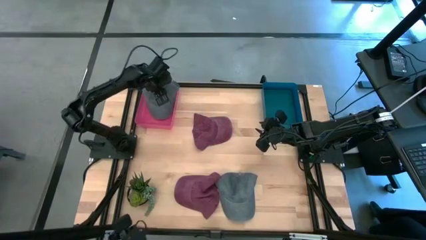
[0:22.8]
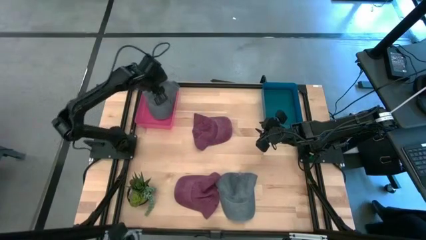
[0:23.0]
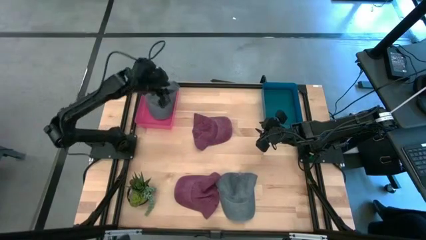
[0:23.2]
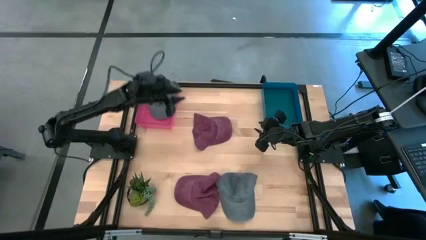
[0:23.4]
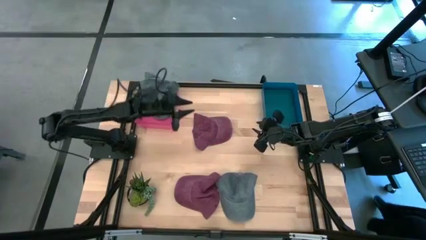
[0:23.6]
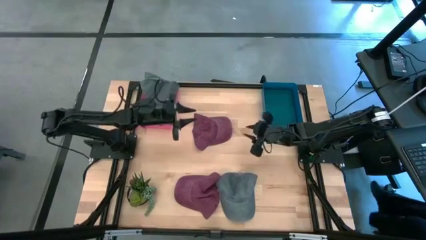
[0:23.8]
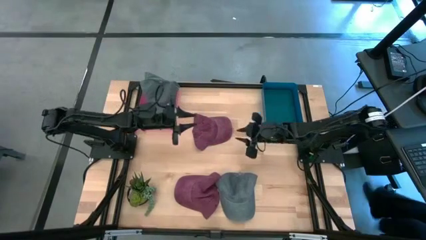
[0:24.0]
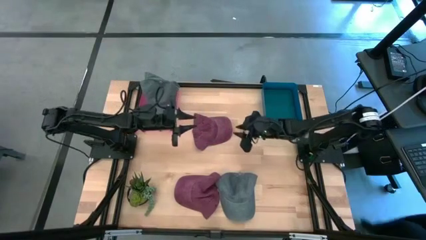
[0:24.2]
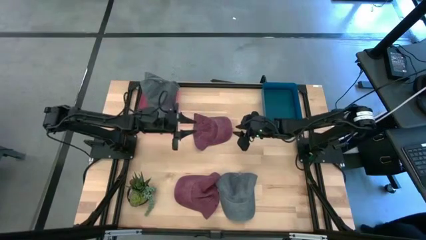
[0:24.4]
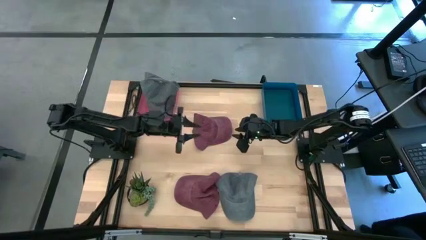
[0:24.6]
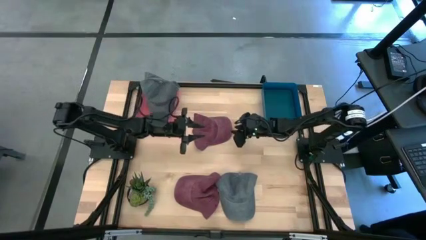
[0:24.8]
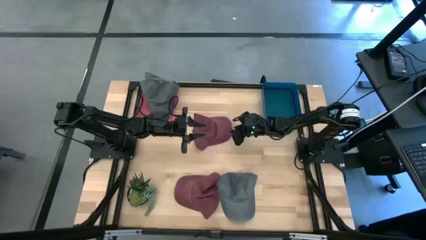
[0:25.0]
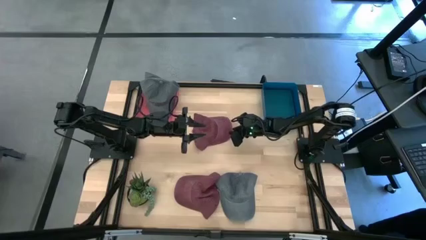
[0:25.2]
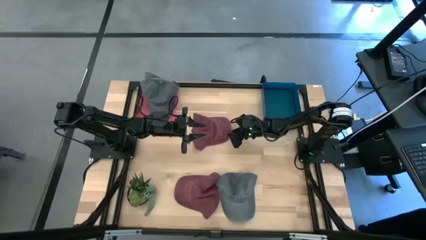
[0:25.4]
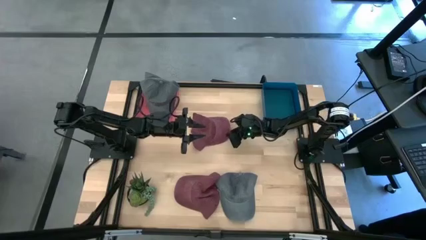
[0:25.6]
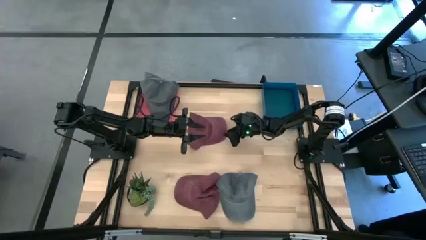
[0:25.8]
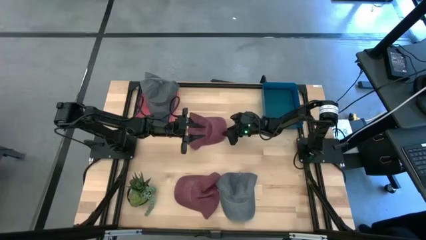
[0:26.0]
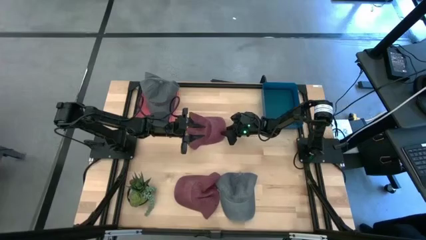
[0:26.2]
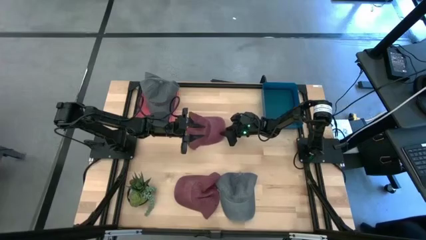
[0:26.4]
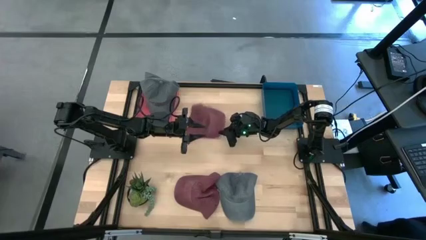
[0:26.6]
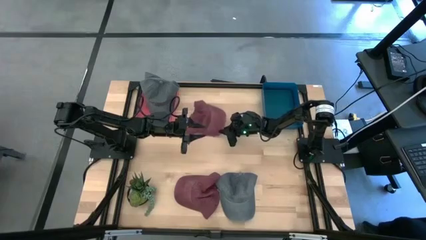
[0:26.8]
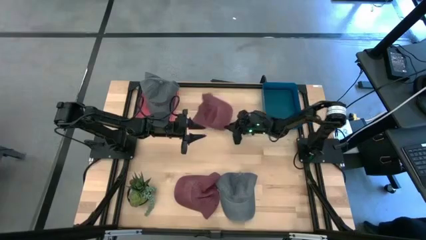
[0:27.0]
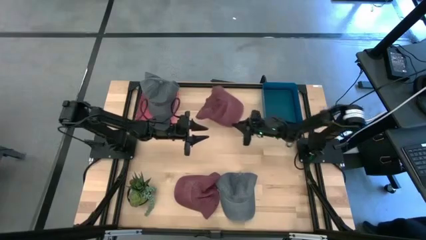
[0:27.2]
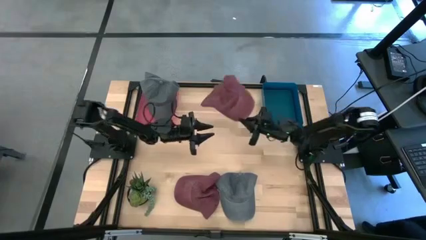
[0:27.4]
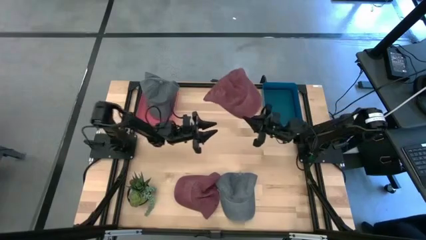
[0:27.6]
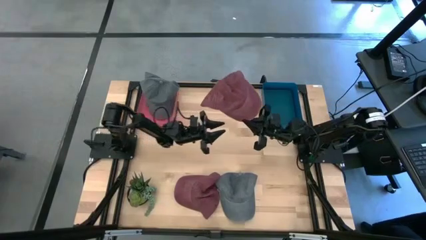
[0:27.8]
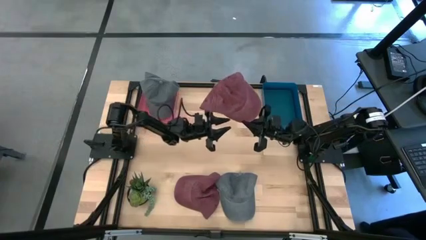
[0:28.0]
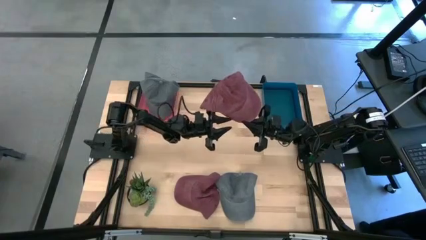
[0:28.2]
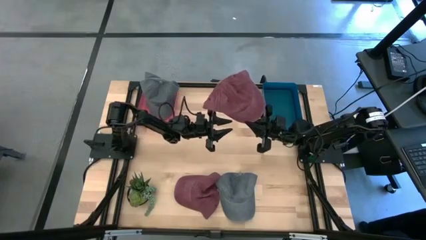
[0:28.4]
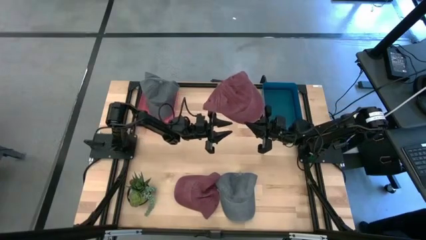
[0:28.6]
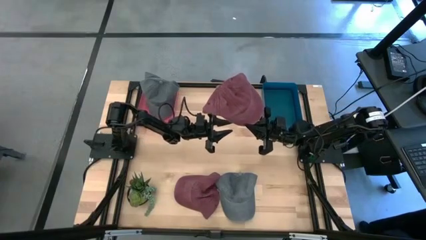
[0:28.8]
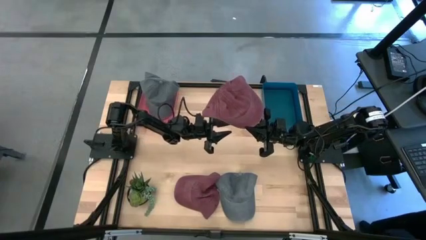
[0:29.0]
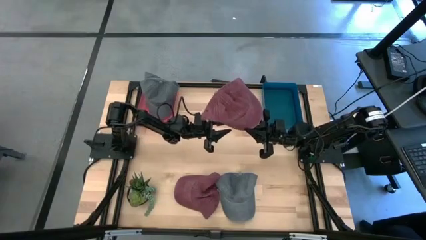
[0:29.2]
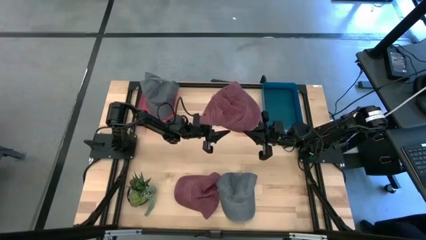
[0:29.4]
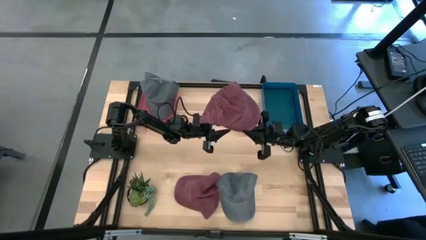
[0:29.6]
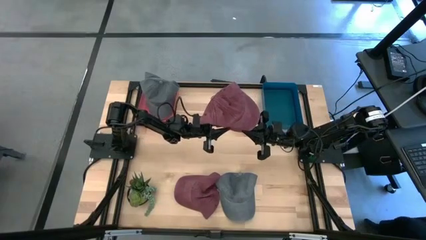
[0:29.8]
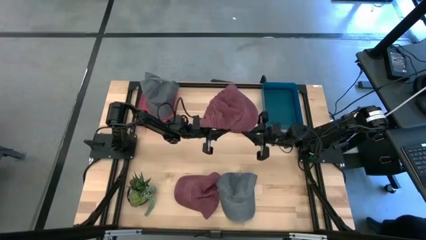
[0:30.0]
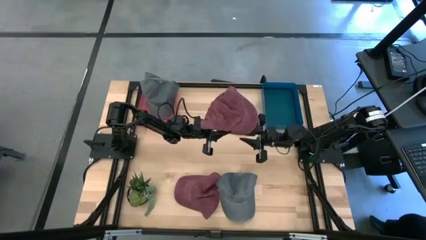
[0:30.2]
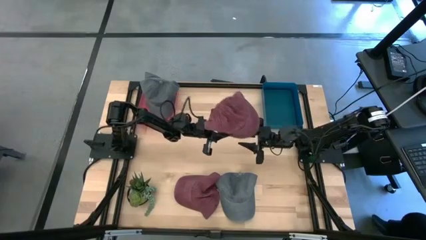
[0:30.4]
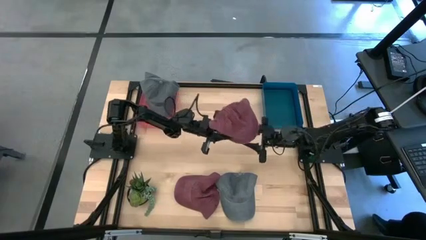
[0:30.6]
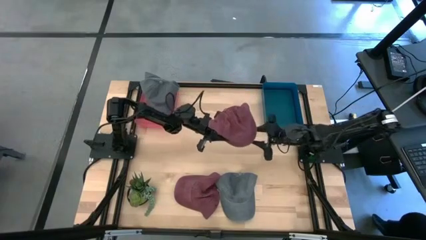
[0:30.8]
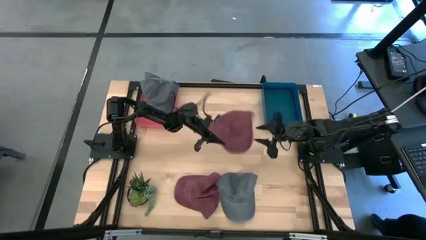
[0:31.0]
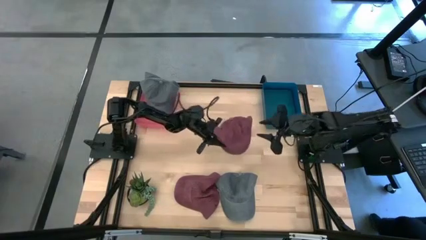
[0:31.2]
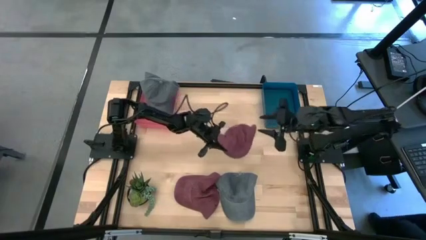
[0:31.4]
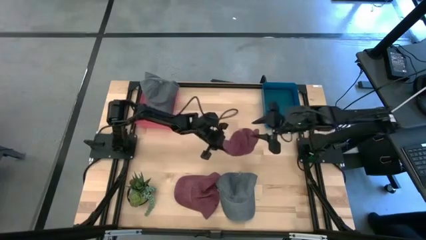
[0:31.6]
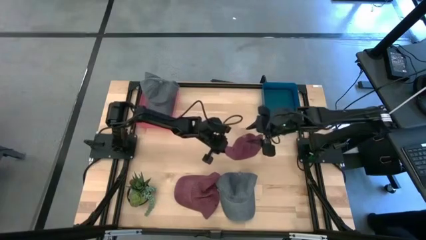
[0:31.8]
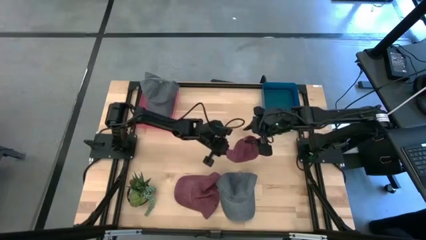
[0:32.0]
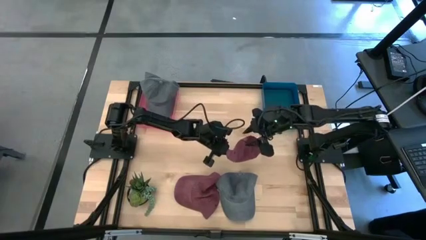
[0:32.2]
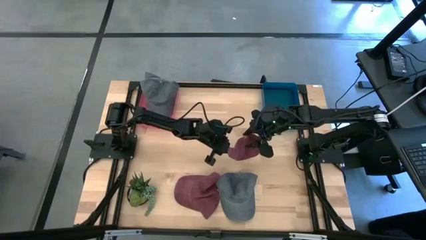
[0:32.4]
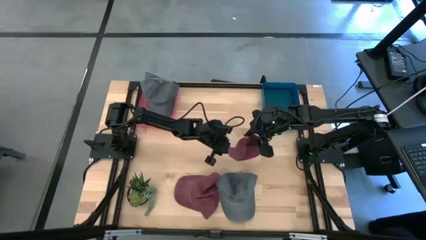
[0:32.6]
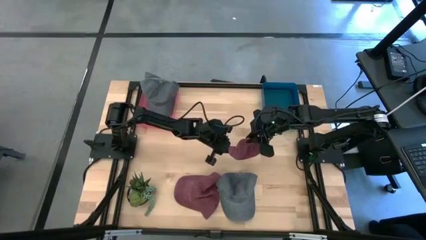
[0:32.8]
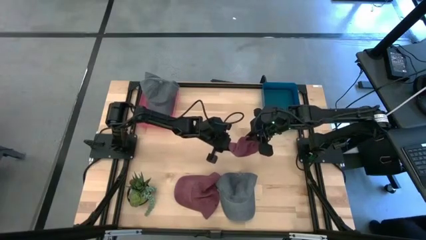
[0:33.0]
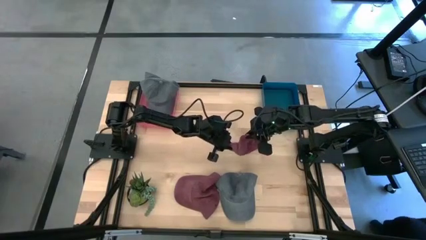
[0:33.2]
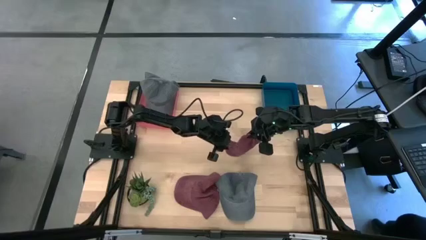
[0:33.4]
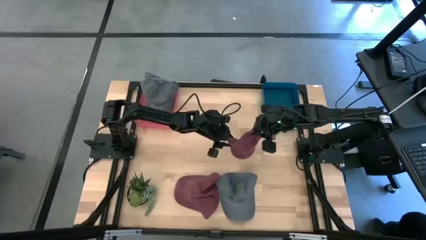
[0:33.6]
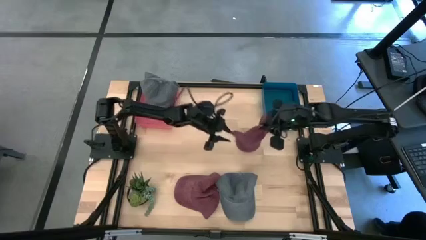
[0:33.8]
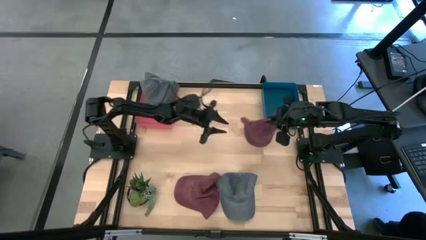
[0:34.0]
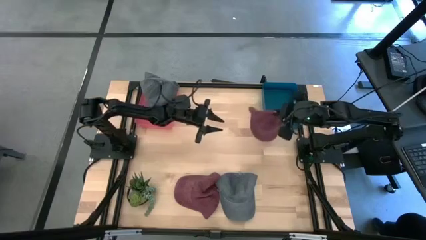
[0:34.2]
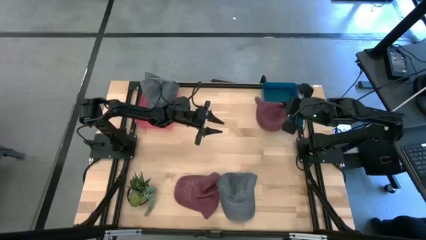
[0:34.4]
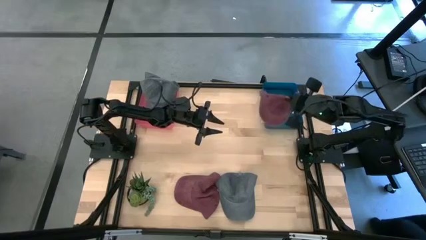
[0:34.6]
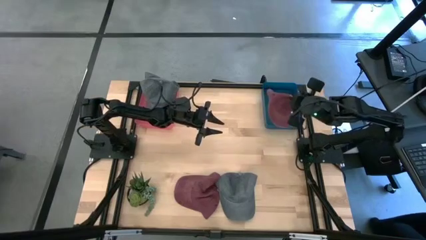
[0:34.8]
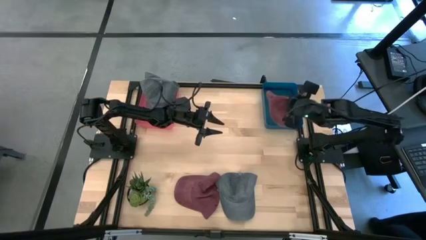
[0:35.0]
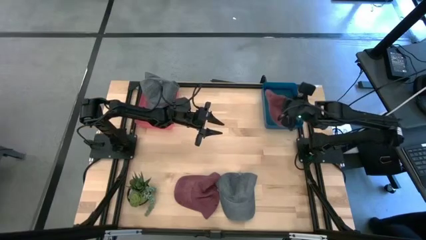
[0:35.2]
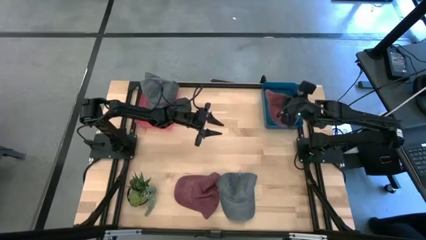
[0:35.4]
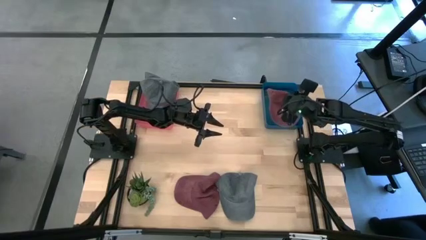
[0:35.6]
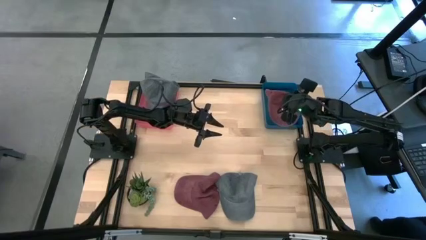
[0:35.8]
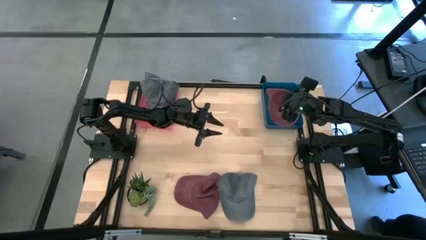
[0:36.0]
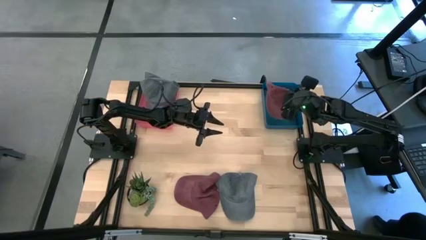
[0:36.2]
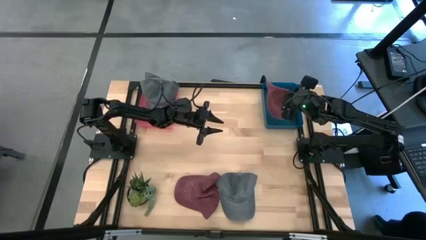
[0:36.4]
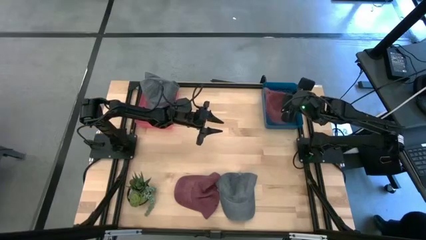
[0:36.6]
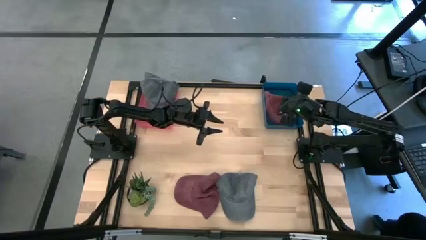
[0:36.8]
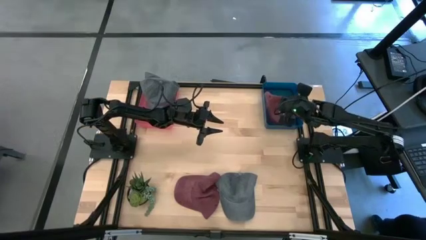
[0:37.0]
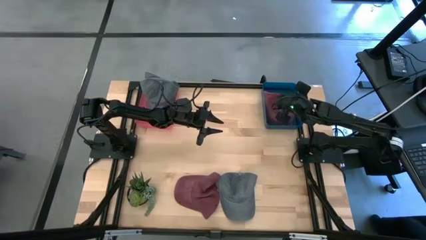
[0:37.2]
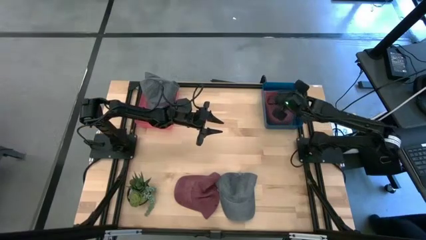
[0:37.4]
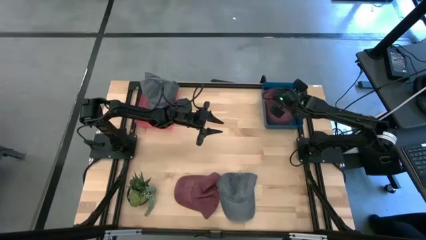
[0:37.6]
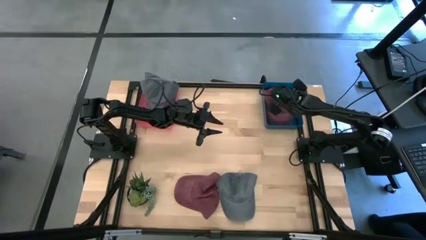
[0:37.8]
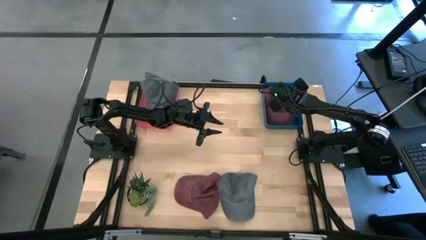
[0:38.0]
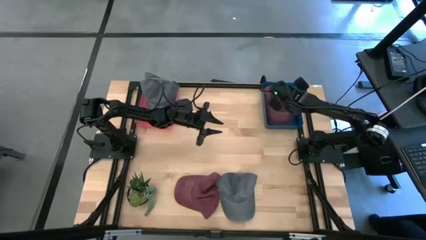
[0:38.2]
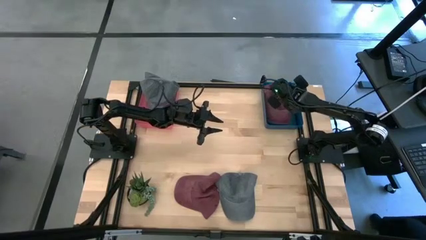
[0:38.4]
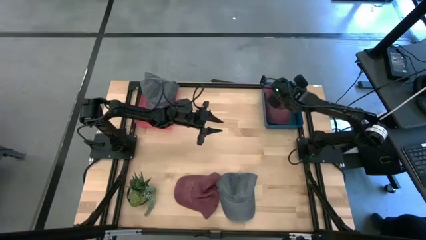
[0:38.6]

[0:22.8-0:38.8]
Task: Pick & Place hat
Put the top red cap into the blue bin
